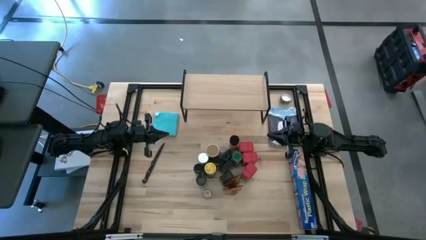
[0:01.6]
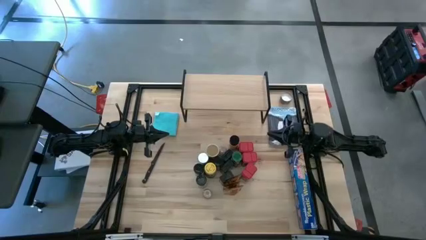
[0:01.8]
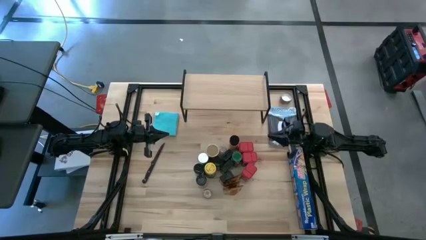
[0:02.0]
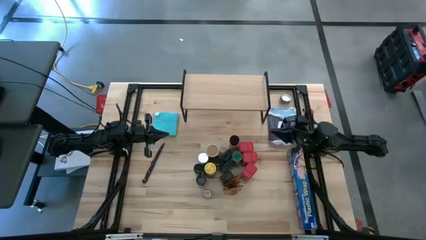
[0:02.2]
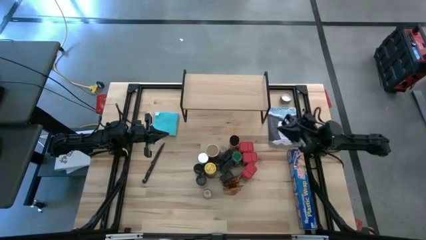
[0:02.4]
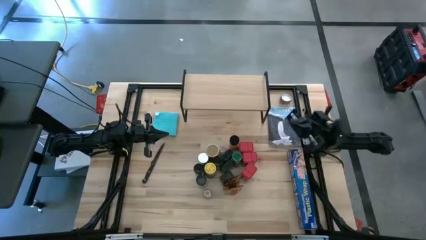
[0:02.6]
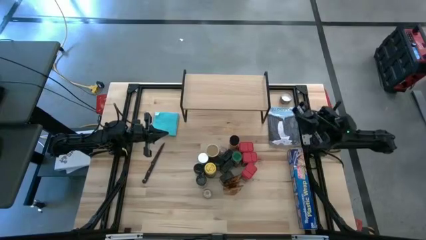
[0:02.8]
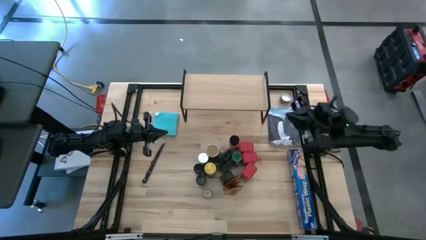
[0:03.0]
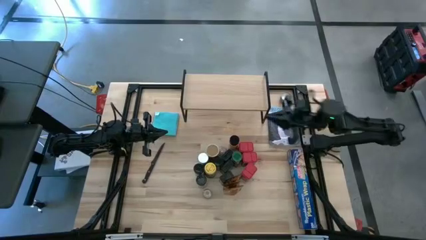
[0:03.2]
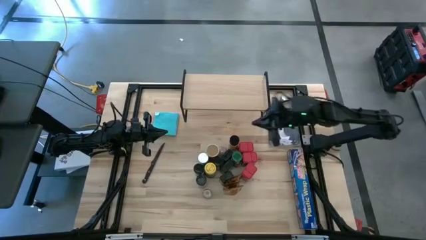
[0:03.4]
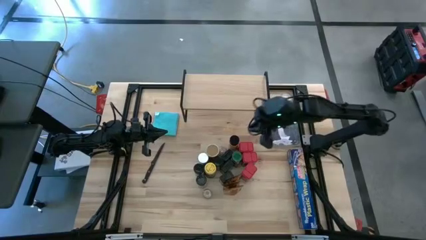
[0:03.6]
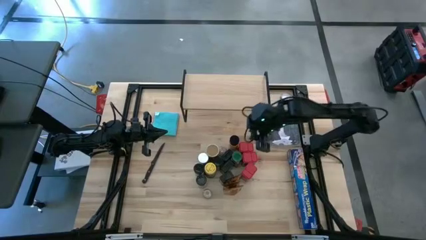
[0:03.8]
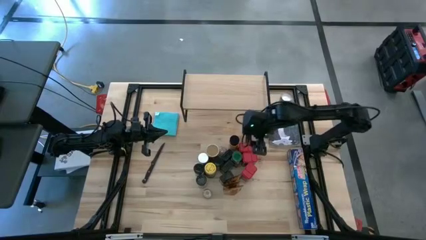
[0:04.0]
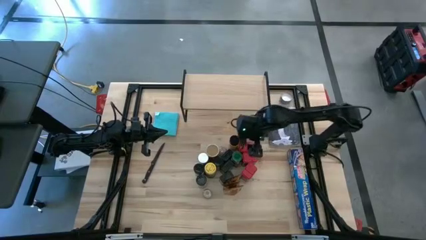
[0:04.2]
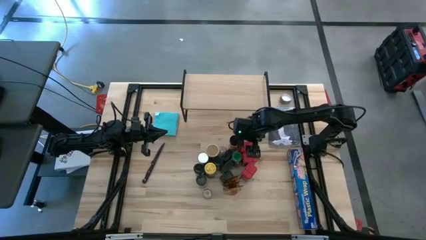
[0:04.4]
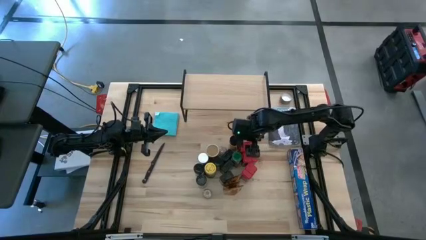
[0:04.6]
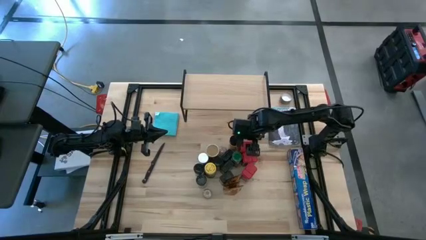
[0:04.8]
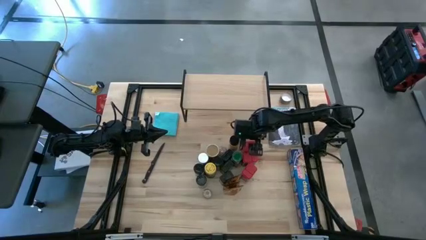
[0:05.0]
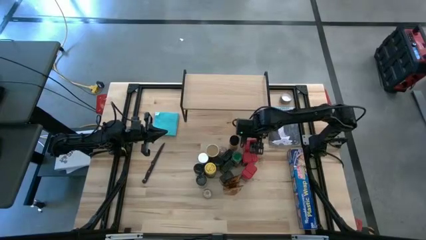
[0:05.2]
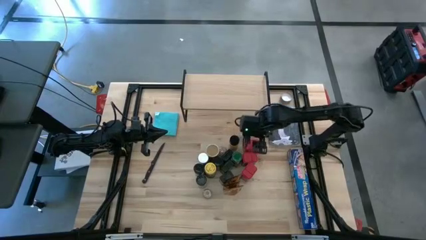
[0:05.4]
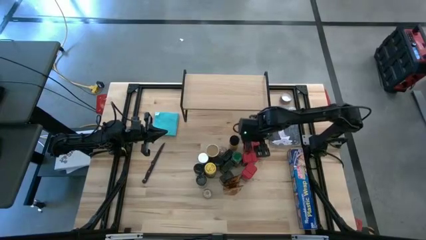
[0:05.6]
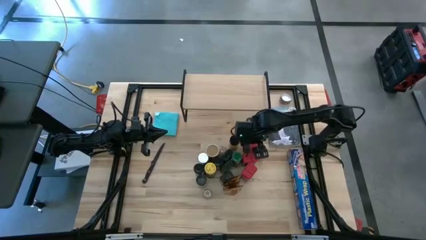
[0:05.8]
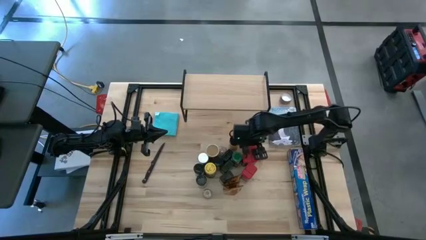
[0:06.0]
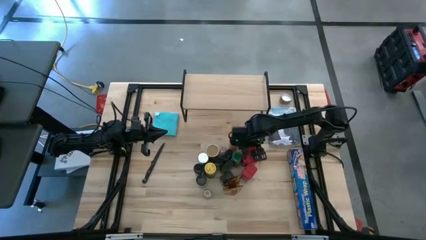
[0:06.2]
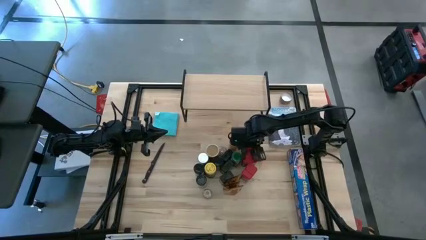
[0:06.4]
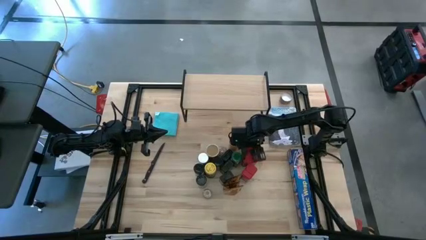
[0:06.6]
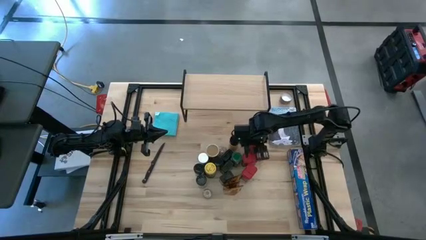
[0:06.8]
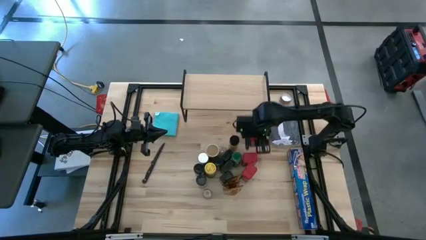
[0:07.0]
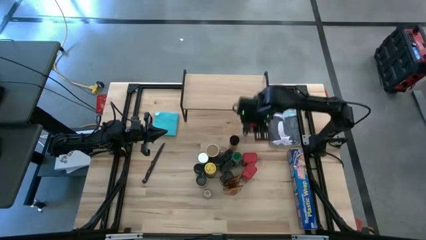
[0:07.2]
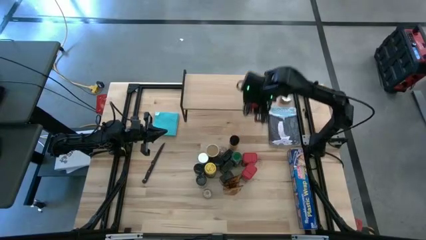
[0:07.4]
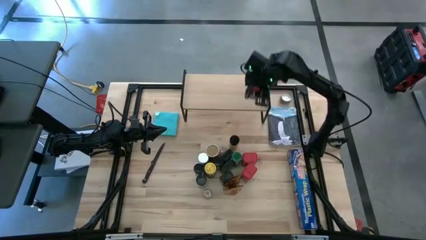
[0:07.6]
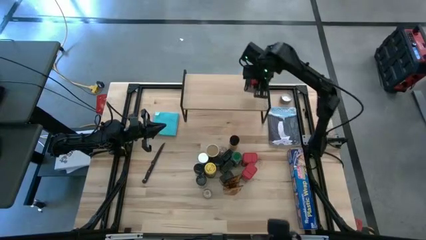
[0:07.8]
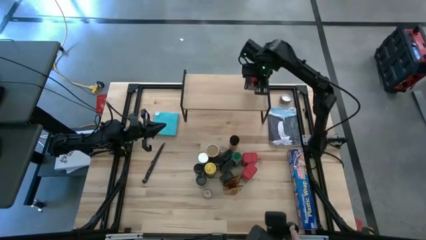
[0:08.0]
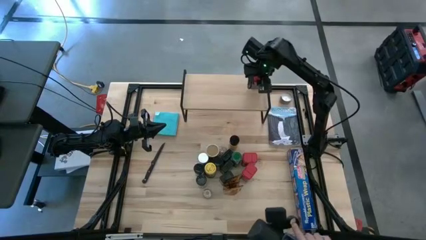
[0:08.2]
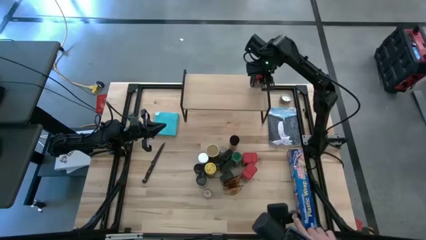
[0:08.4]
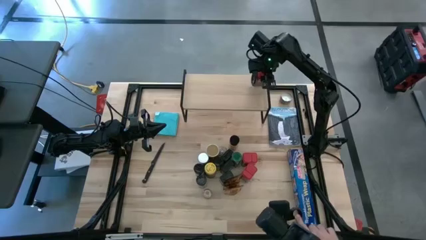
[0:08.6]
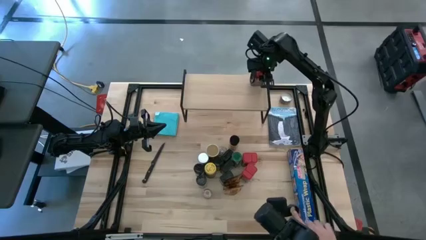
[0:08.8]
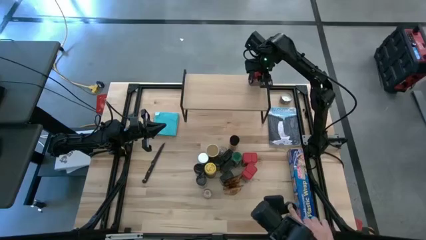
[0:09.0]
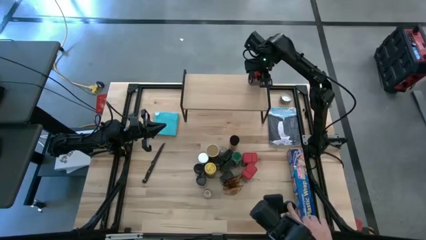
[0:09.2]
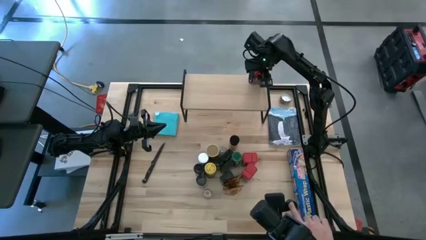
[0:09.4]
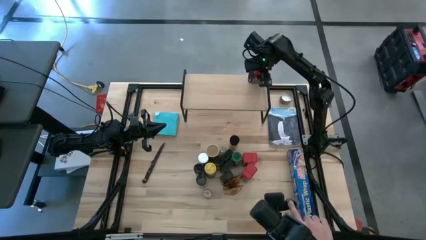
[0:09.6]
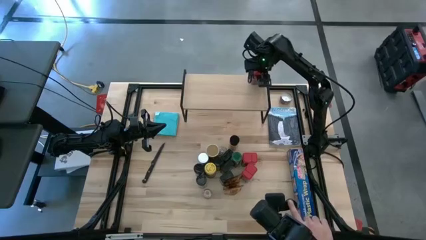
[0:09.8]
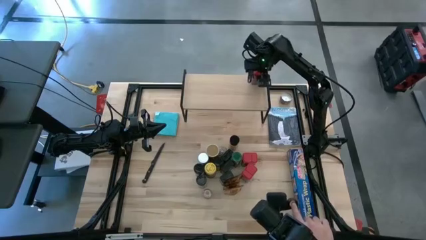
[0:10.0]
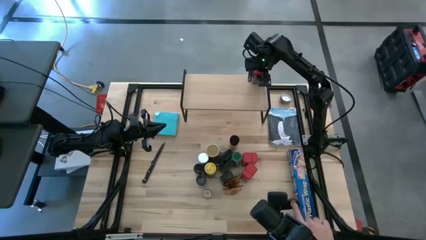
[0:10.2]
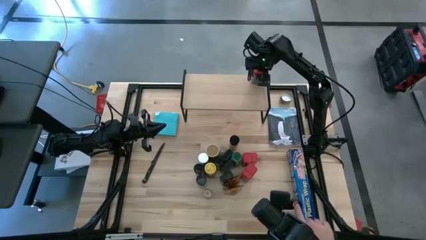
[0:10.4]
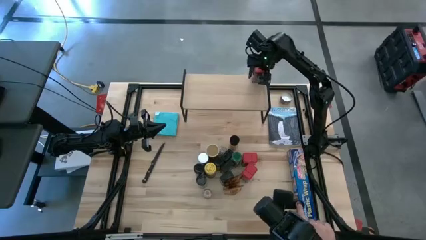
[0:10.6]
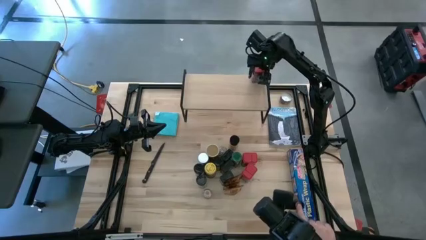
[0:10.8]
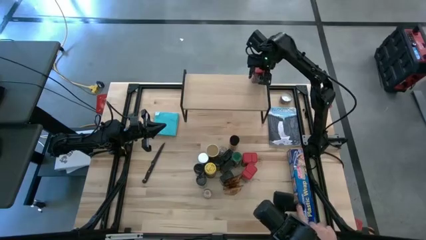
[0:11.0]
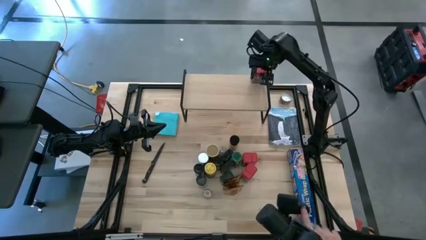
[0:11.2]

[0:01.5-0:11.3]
Task: Shelf spices
Put the red seasoning can on the shelf

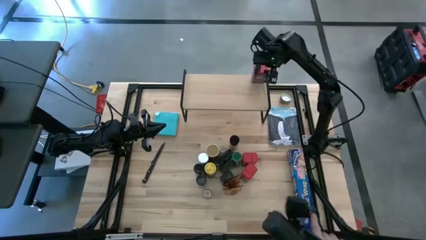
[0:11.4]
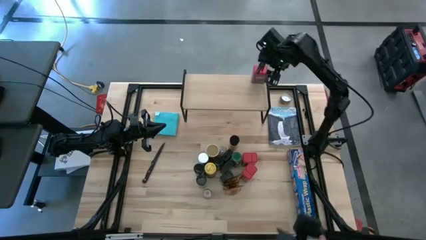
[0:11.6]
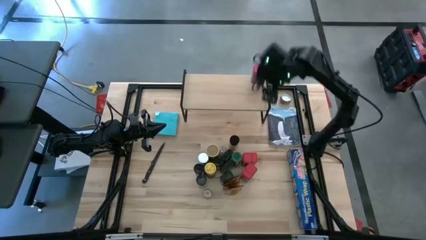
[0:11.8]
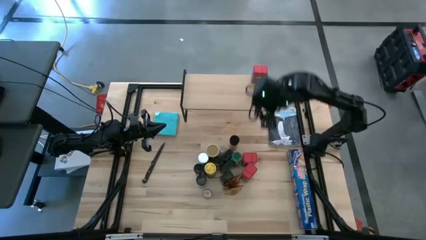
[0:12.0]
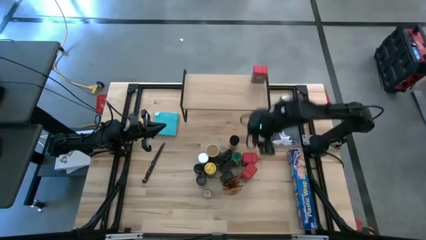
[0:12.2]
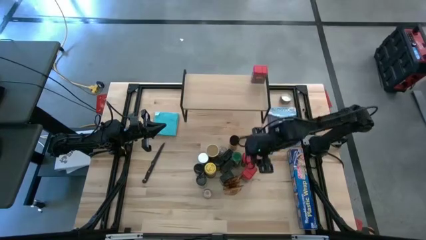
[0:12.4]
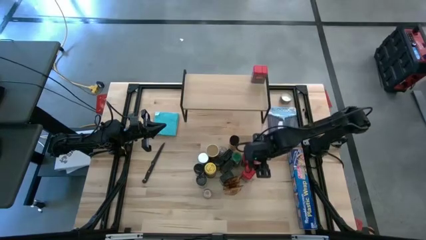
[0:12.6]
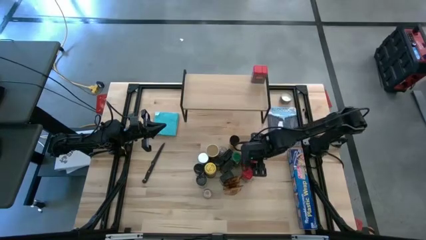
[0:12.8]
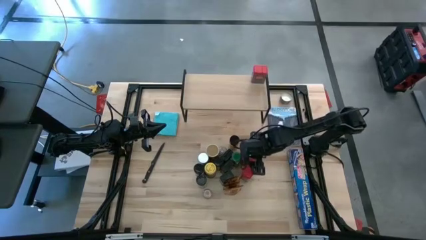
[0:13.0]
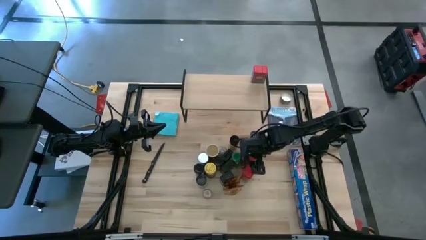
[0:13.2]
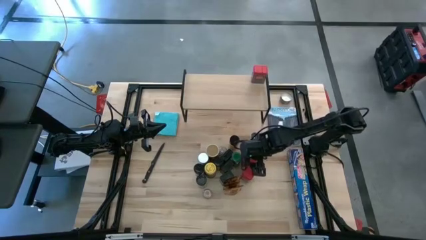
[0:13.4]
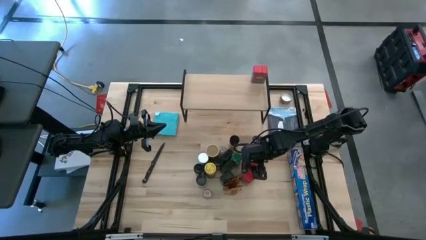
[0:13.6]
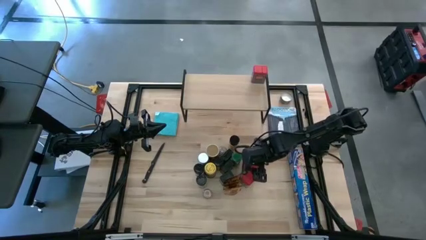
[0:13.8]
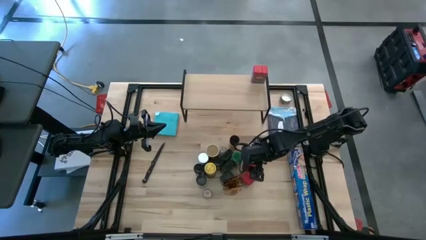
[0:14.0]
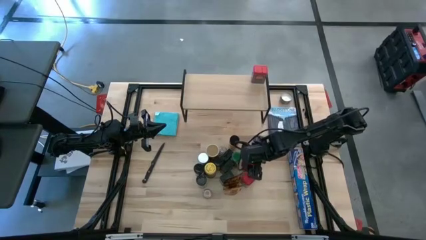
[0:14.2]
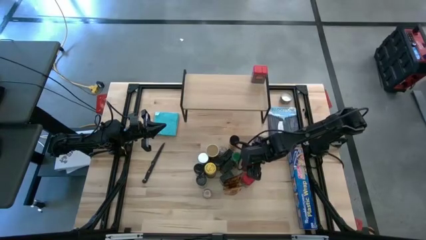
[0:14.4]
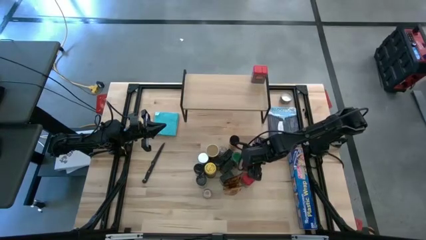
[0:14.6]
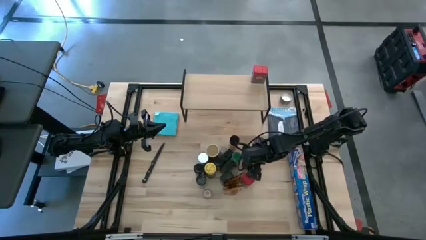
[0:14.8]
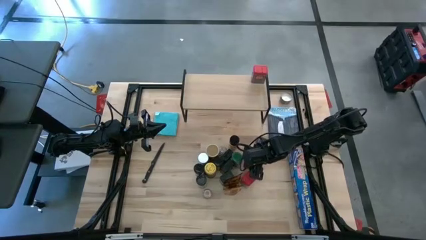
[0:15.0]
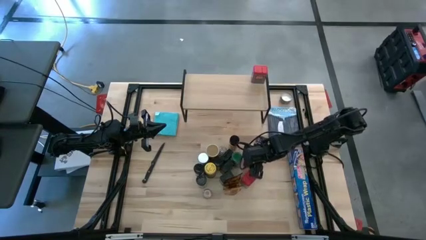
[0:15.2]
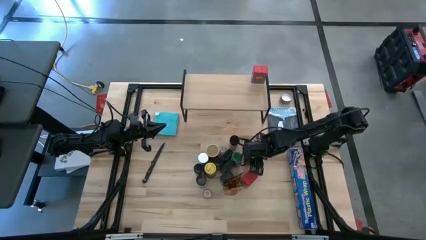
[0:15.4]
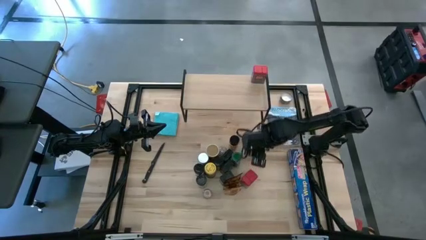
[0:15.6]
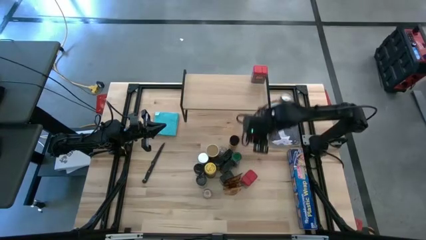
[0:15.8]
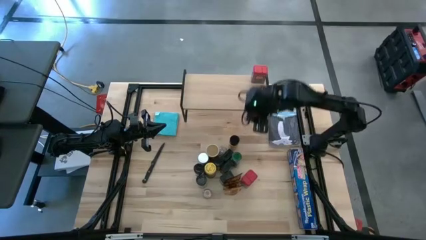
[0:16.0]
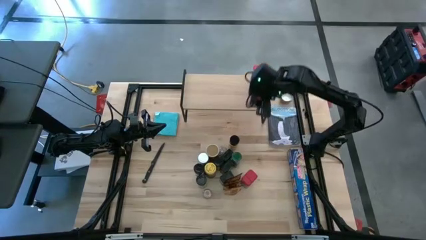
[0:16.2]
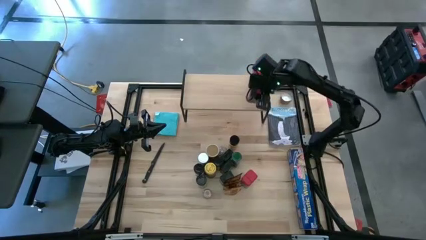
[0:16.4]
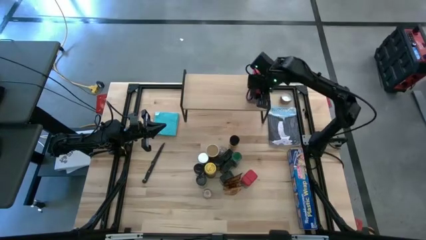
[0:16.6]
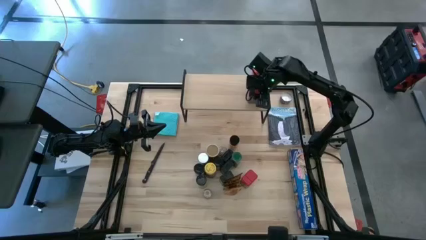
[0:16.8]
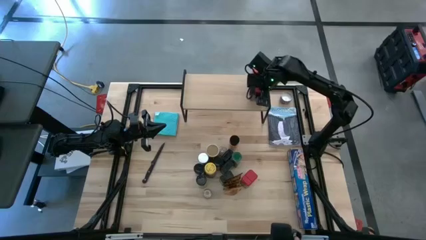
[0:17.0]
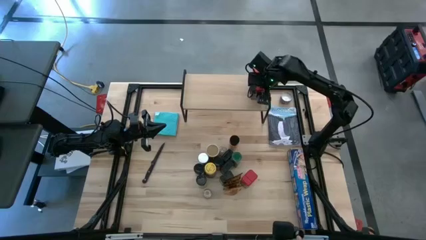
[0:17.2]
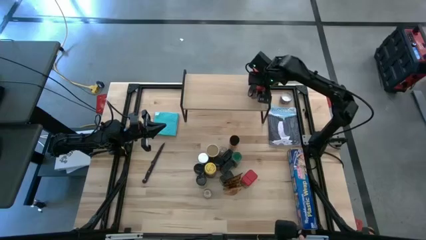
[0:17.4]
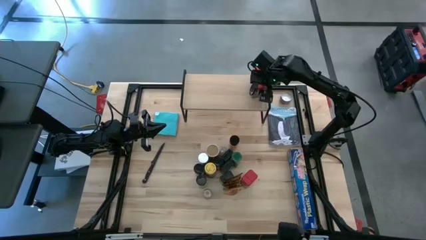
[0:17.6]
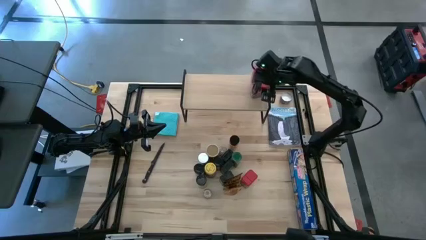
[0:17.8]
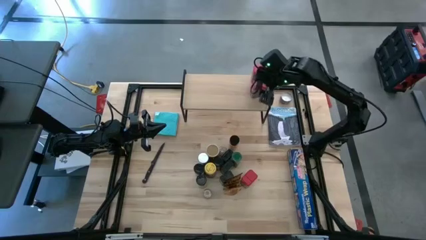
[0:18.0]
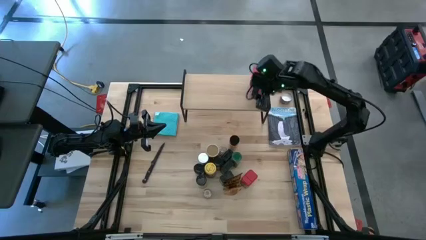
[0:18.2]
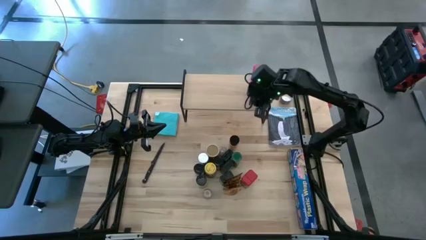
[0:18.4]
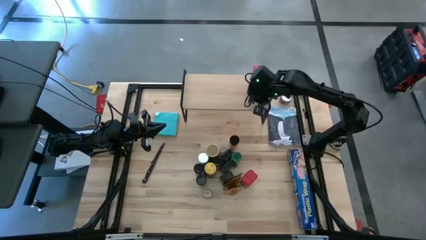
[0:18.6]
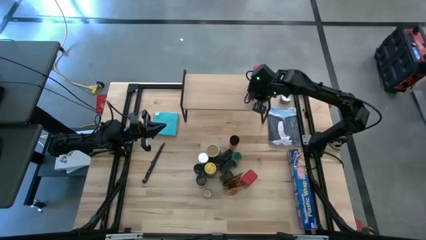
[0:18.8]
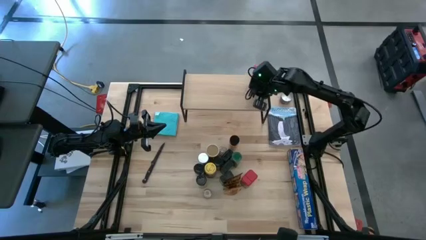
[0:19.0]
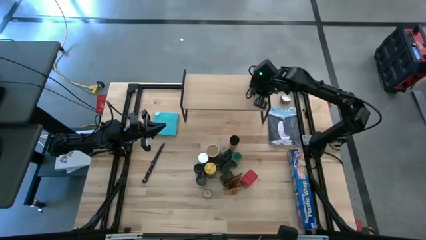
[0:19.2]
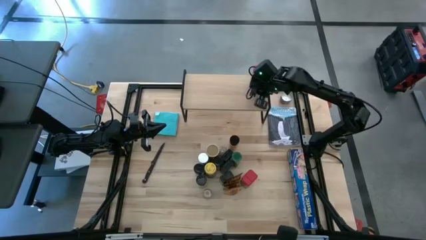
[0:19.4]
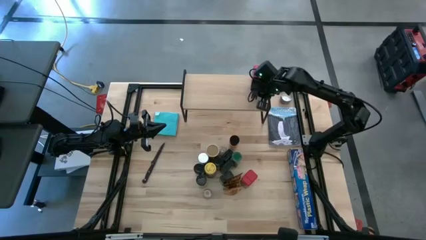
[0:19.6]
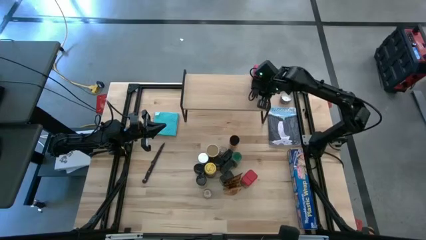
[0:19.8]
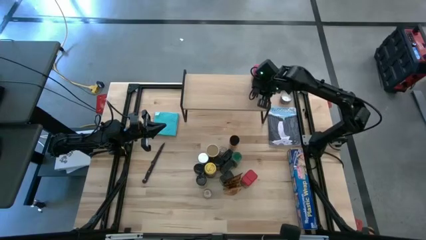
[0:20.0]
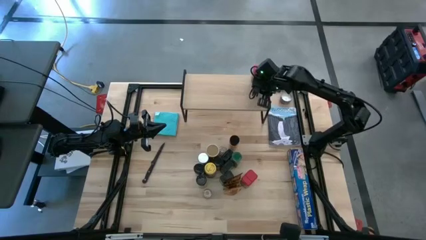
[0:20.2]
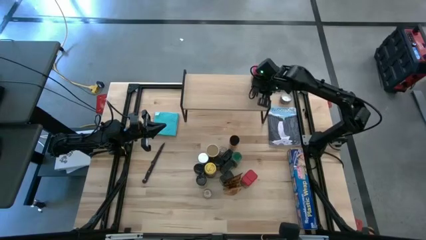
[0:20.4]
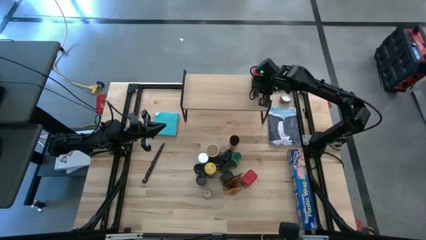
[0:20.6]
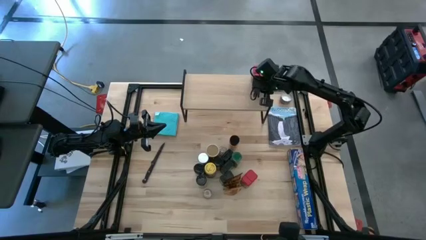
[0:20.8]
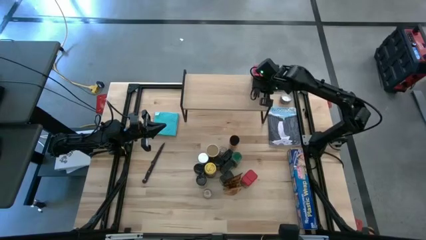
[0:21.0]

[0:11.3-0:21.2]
Put the red seasoning can on the shelf
